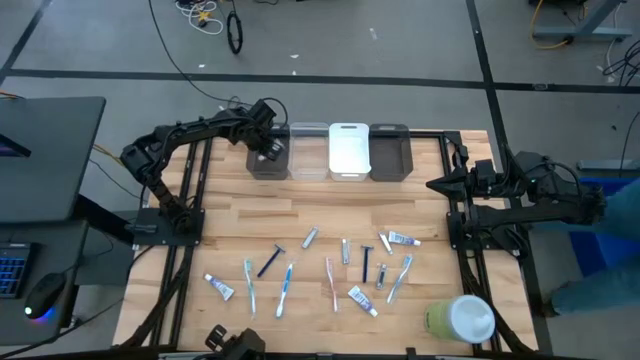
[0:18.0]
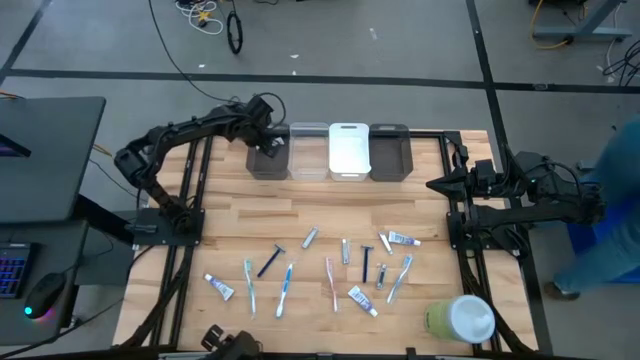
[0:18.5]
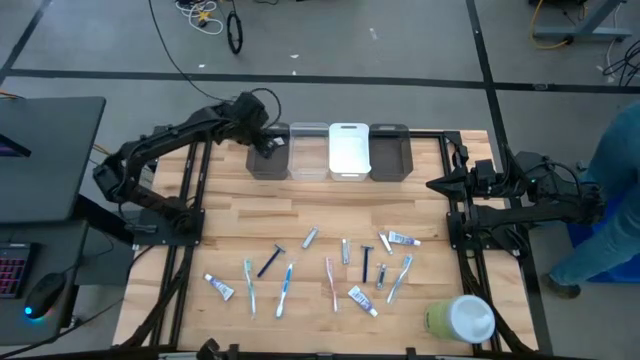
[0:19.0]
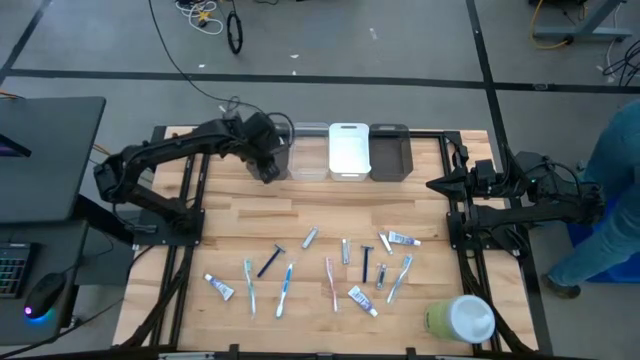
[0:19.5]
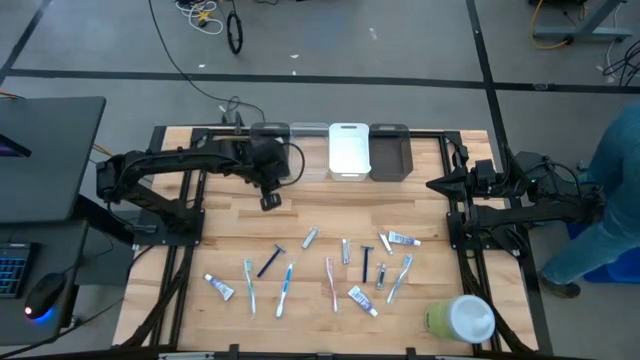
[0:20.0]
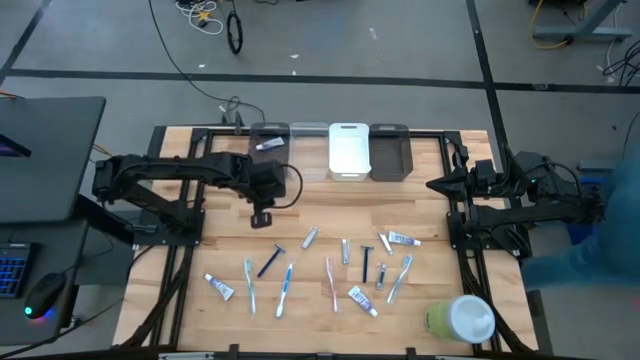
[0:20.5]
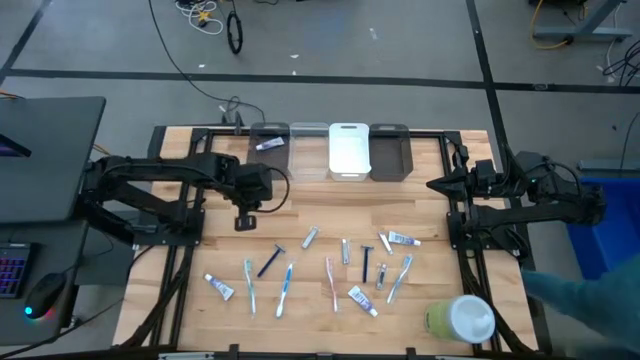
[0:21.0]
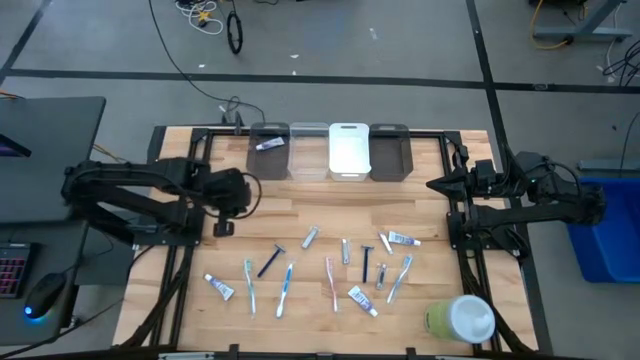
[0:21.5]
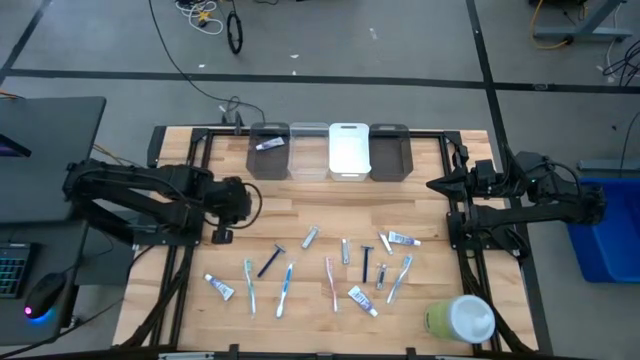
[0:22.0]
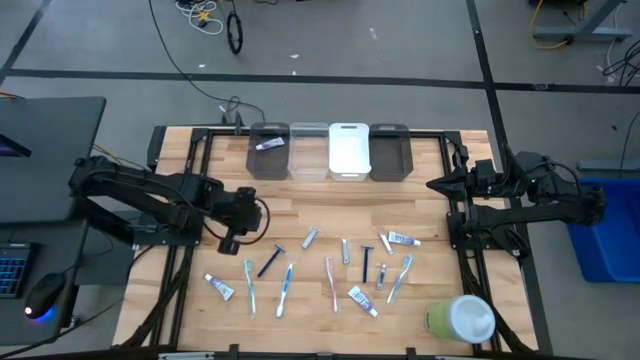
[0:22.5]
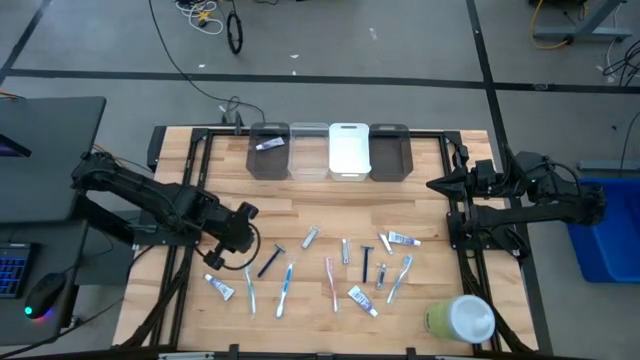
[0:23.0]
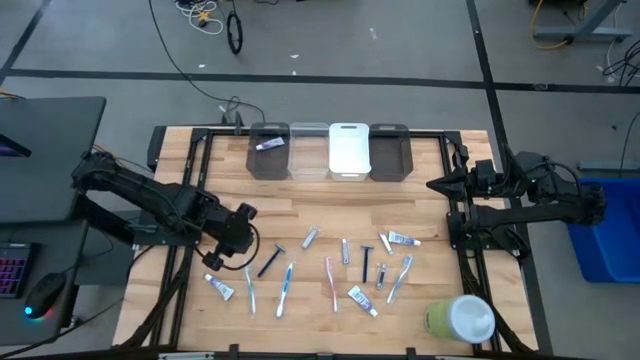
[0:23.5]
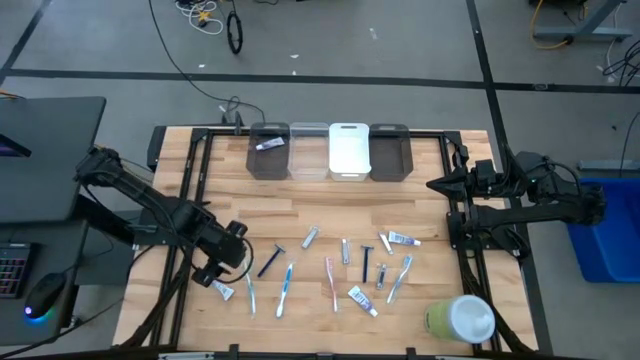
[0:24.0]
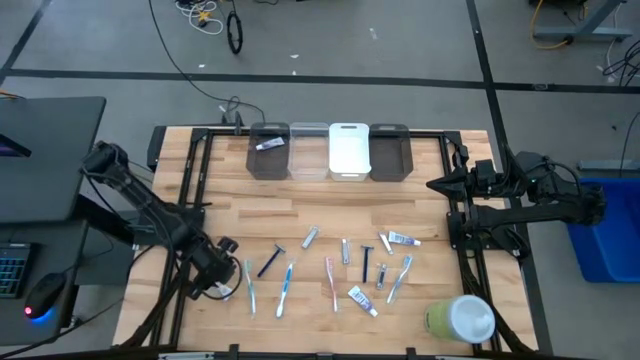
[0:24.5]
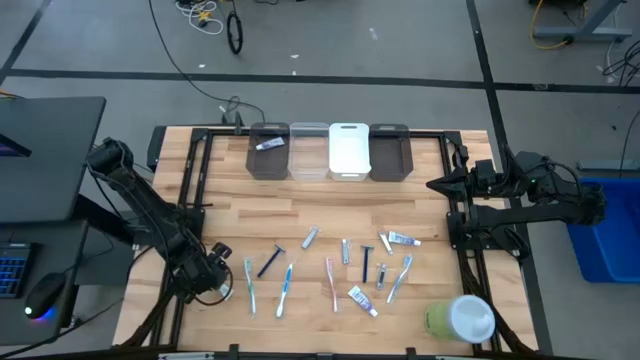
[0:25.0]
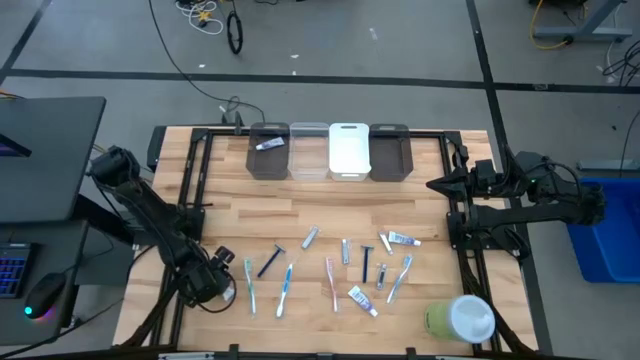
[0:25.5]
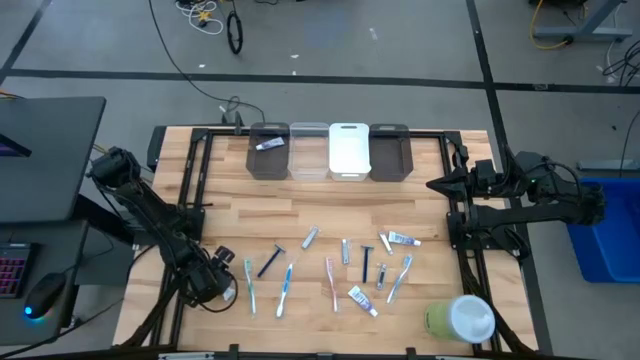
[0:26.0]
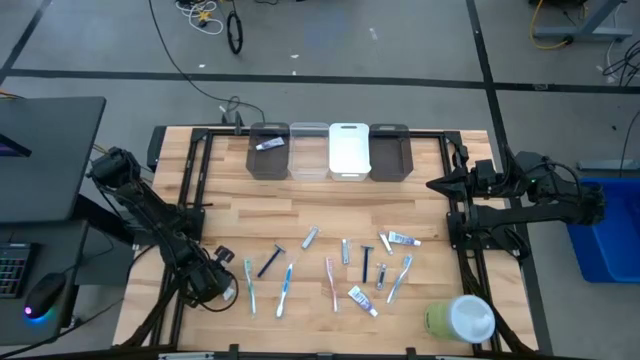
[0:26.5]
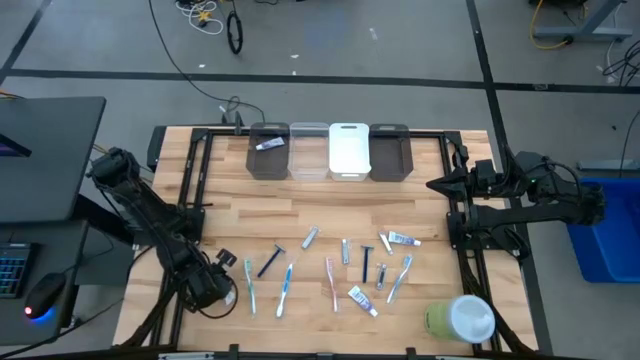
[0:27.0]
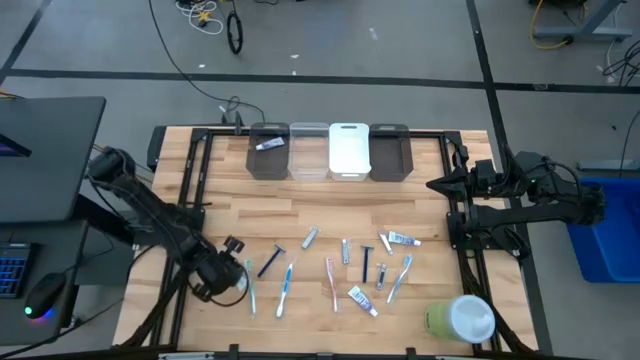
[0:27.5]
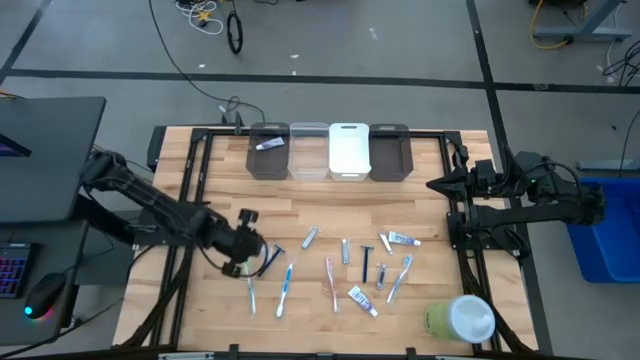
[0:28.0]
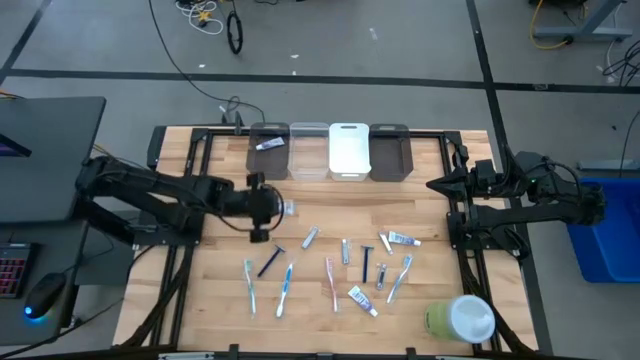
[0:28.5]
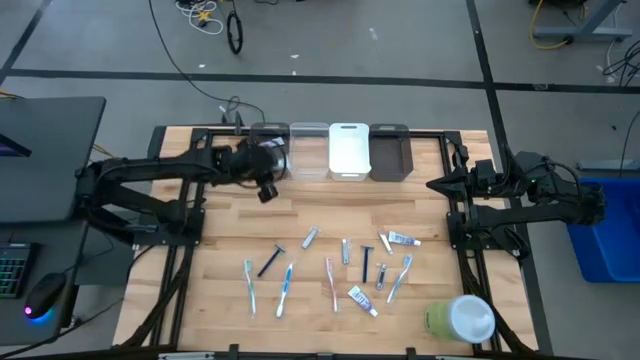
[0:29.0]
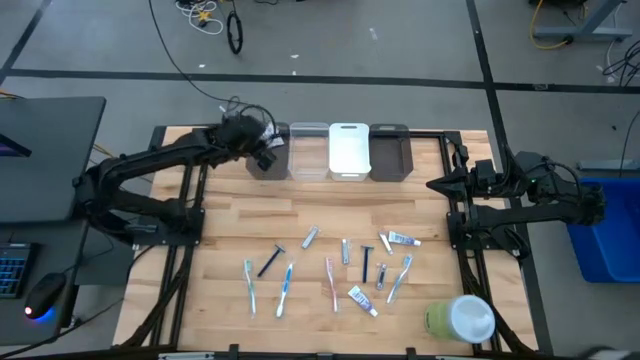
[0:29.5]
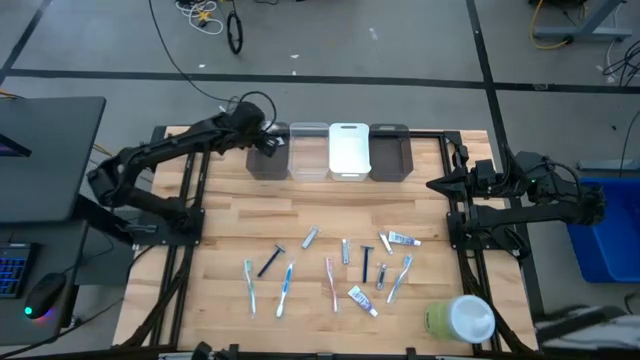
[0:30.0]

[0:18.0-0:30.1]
Task: Pick & Place Travel size toiletries
Put the white toothpaste into the left black bin
